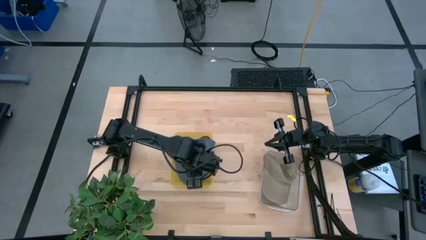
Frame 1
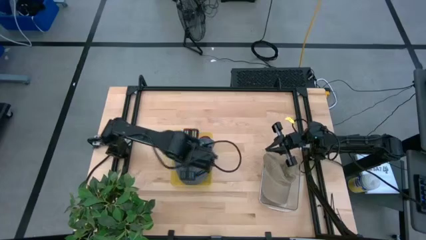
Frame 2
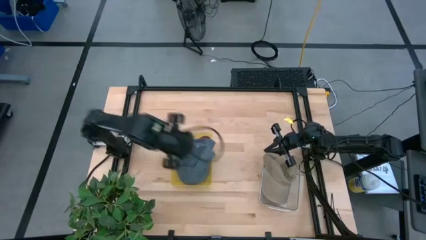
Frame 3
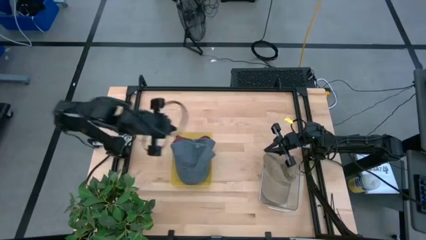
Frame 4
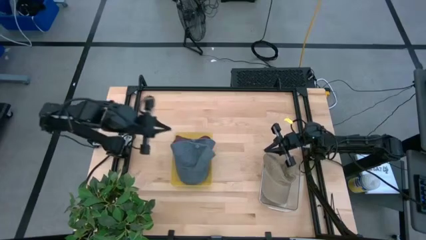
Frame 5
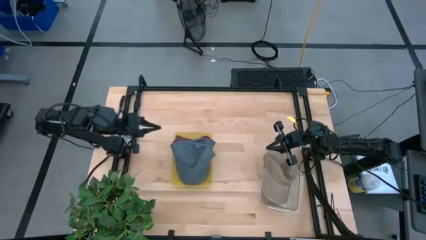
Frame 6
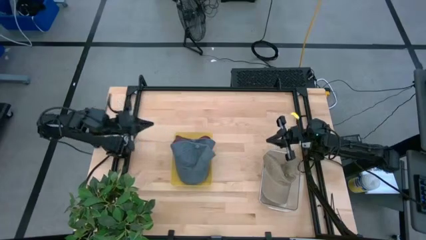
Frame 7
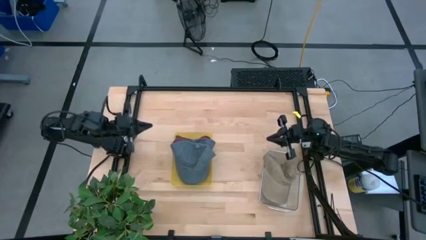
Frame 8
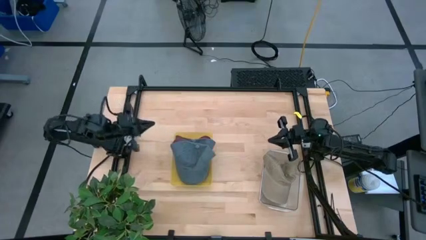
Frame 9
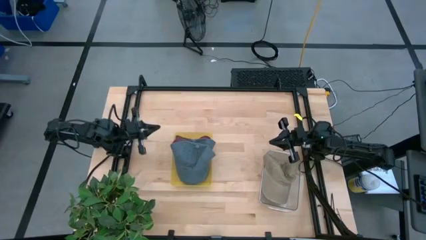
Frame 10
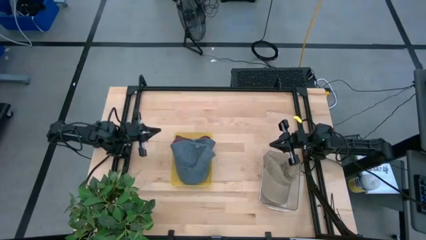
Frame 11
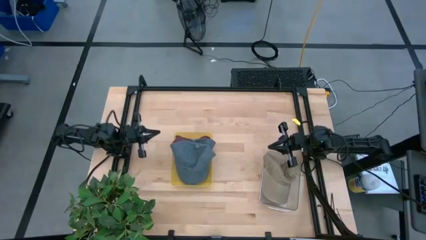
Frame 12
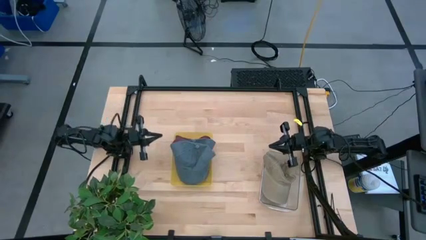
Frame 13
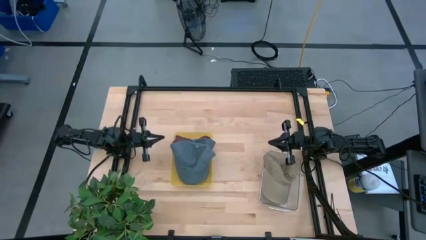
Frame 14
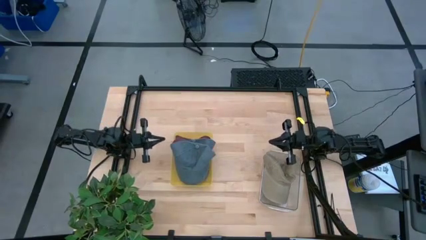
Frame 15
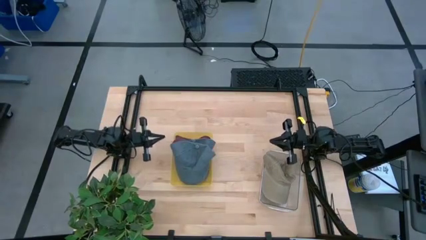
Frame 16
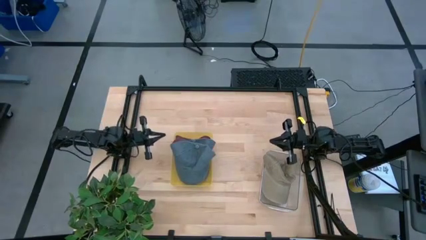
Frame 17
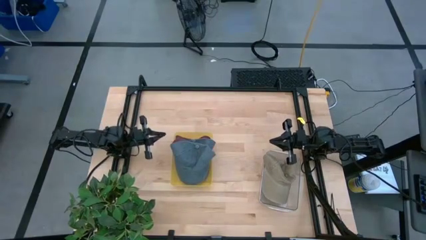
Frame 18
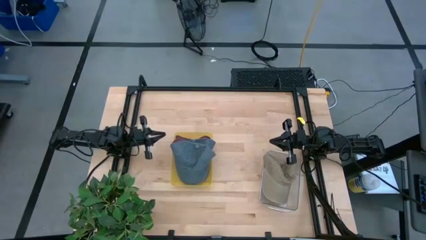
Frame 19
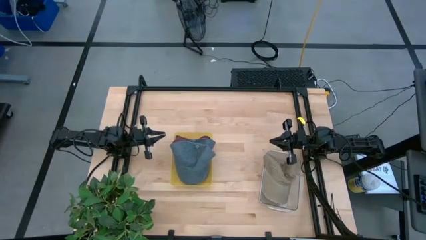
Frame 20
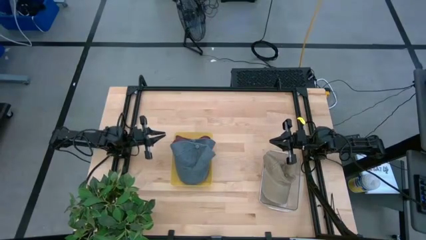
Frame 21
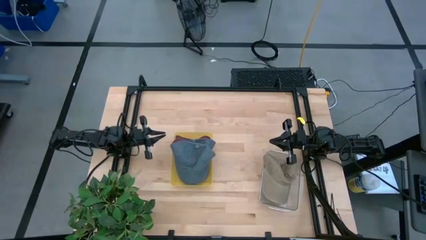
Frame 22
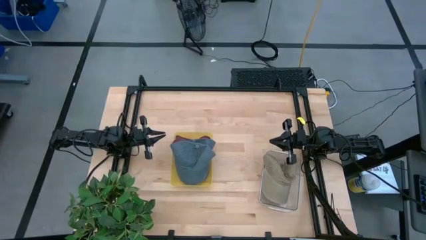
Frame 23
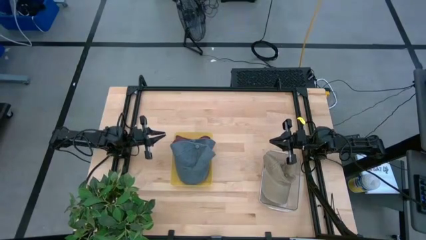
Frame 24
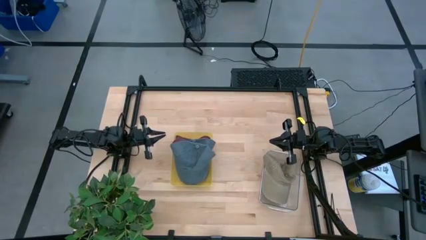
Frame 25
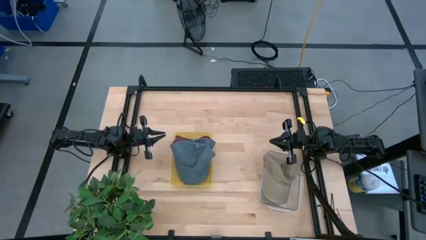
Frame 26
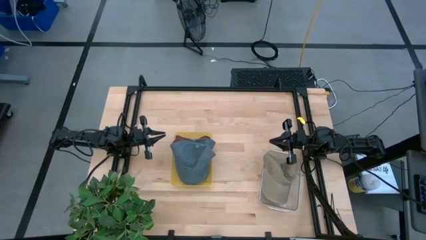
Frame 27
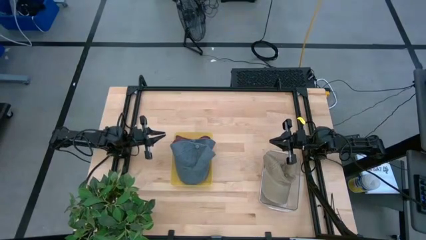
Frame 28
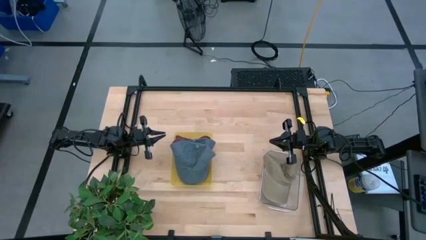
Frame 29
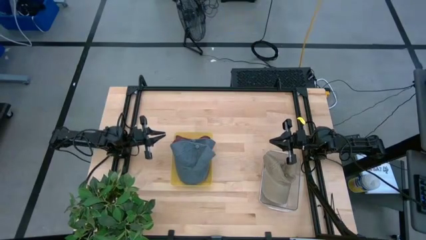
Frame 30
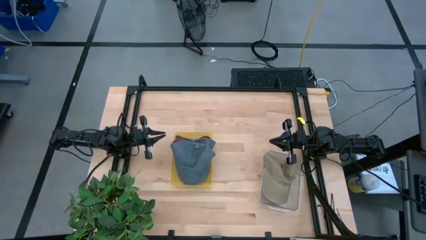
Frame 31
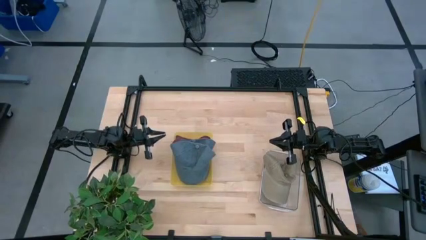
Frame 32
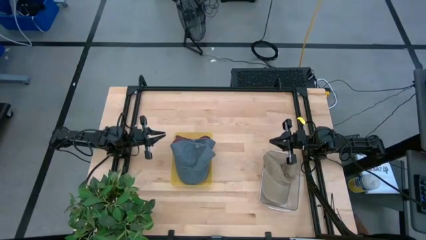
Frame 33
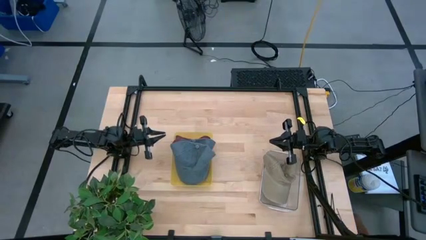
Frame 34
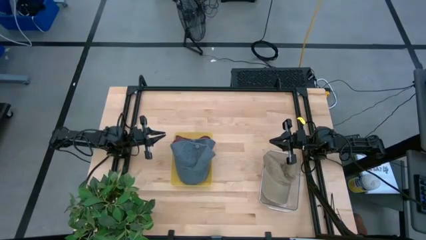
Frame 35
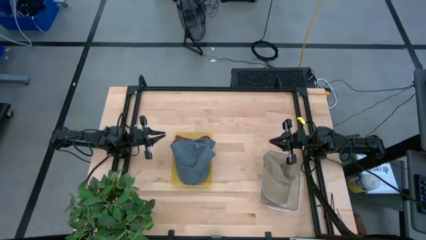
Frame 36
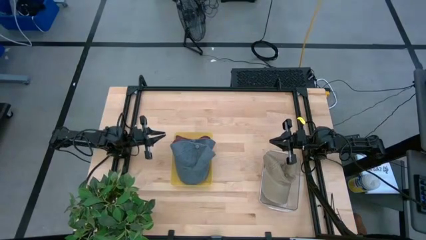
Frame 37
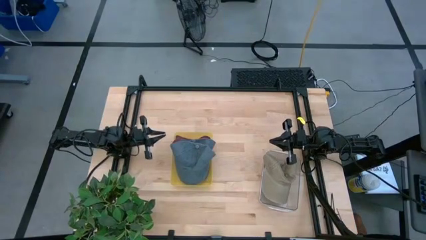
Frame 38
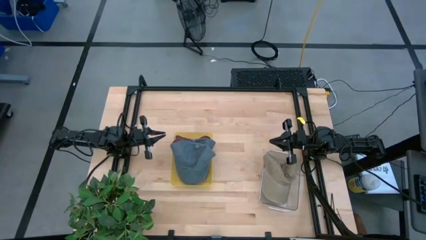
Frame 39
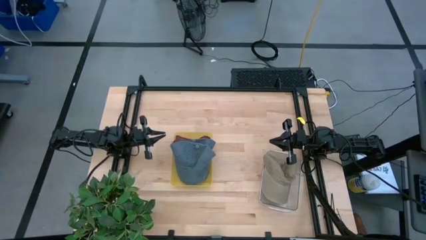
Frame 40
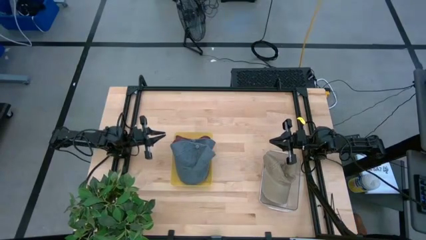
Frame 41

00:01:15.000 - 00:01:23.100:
Task: Pick & Place hat
Return to Home Position

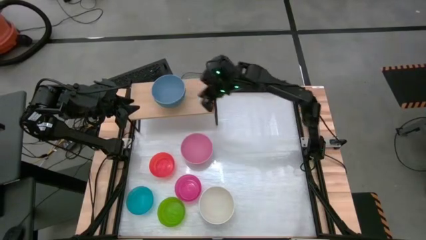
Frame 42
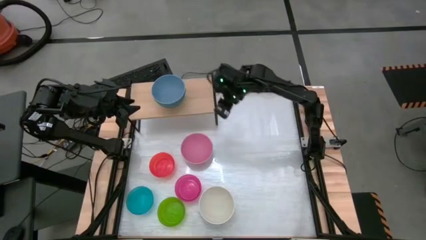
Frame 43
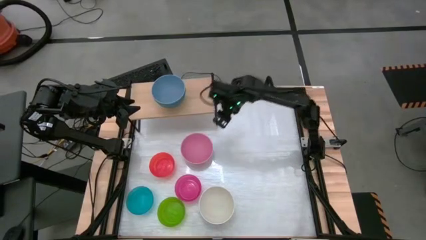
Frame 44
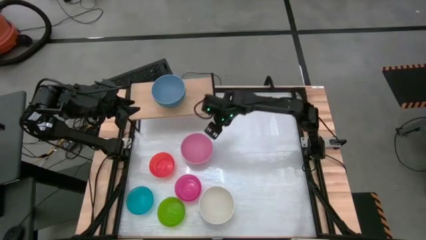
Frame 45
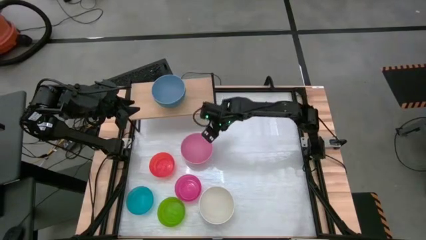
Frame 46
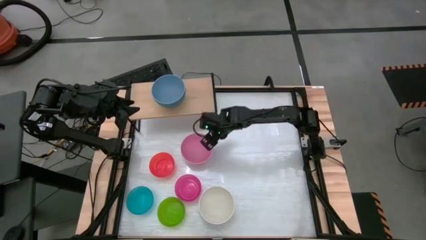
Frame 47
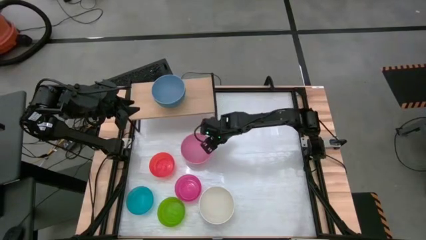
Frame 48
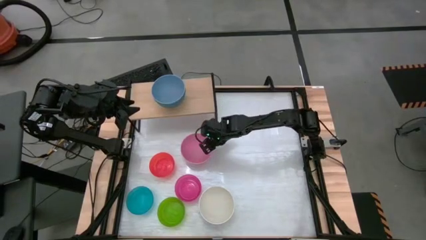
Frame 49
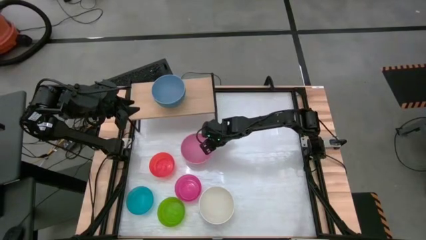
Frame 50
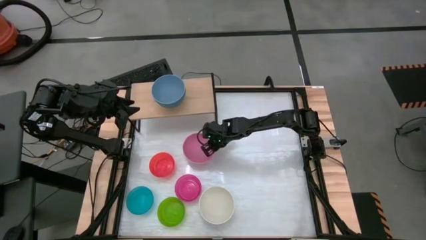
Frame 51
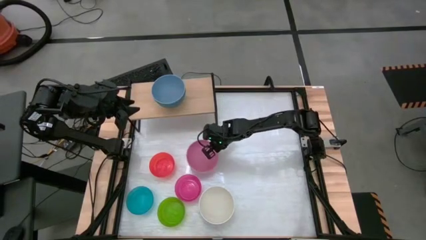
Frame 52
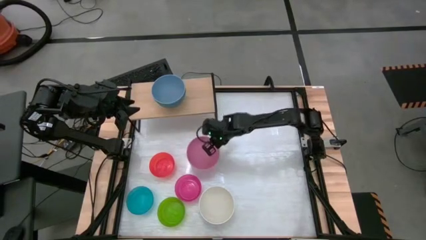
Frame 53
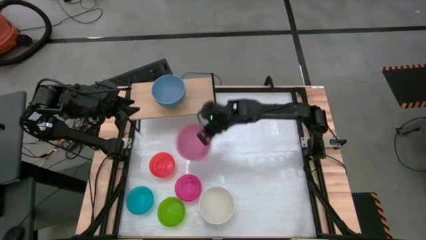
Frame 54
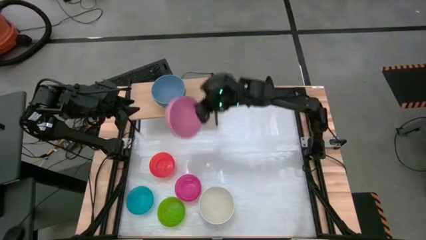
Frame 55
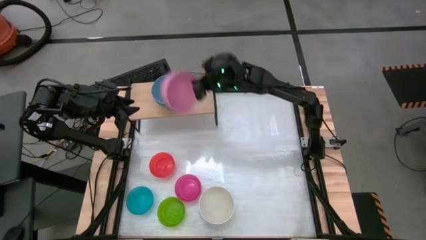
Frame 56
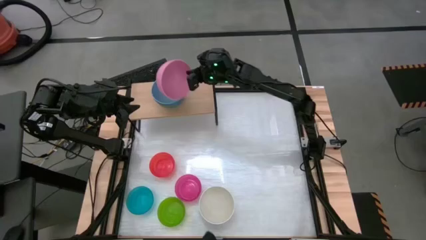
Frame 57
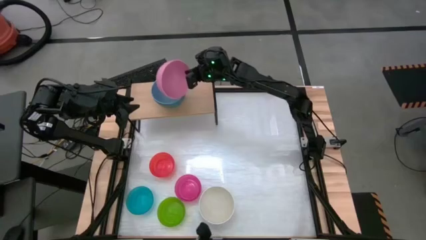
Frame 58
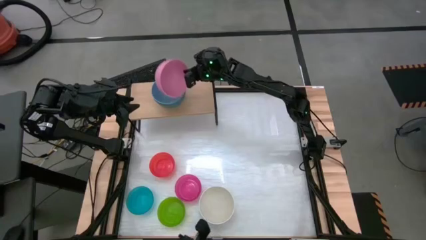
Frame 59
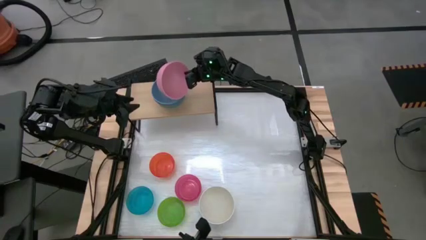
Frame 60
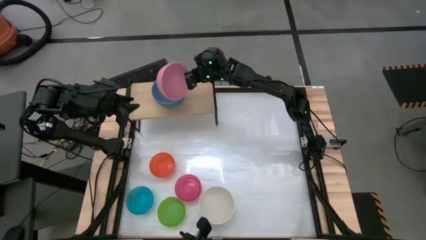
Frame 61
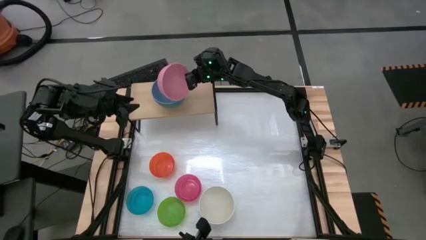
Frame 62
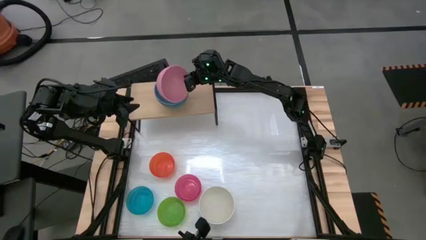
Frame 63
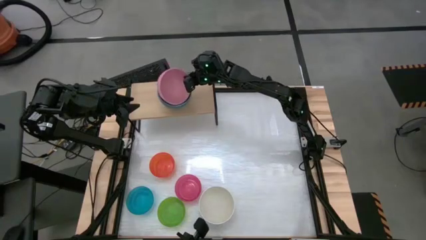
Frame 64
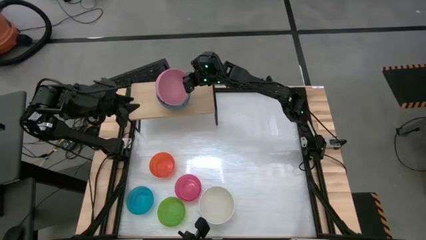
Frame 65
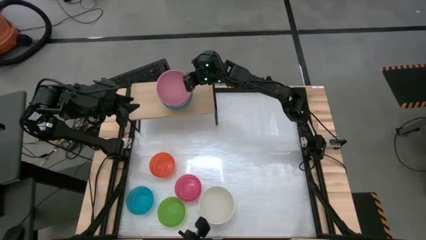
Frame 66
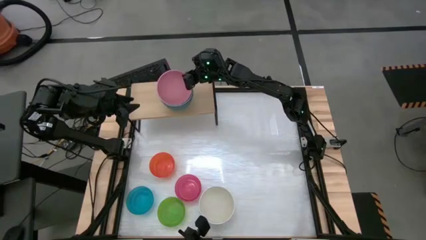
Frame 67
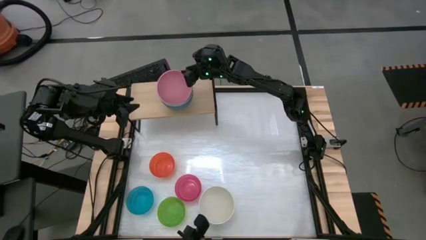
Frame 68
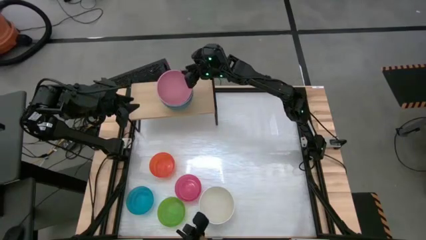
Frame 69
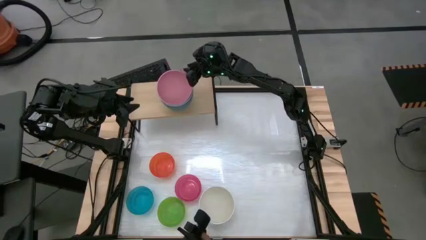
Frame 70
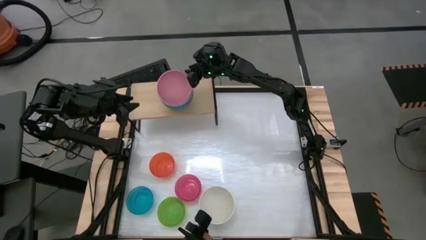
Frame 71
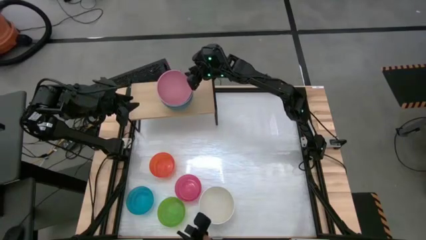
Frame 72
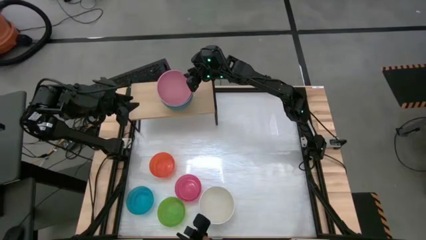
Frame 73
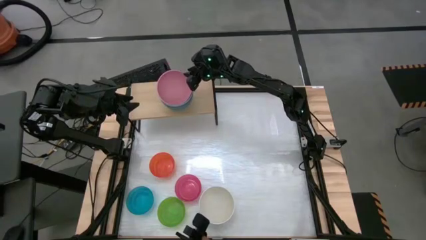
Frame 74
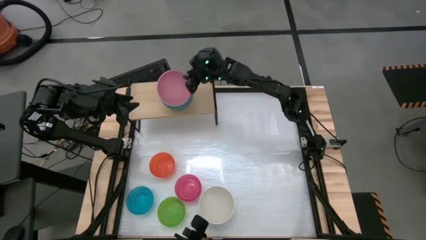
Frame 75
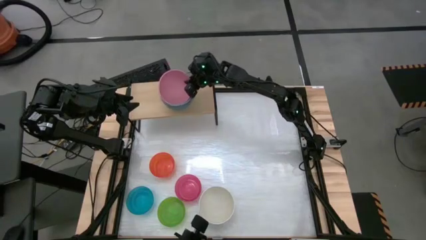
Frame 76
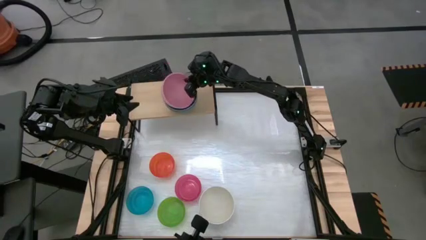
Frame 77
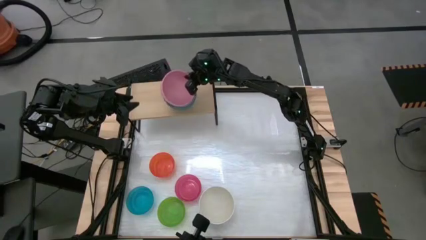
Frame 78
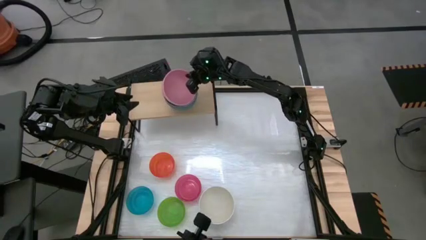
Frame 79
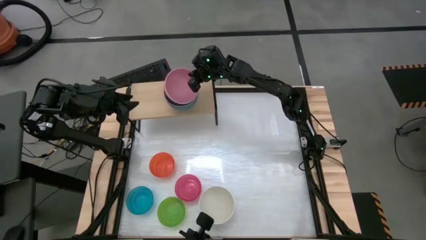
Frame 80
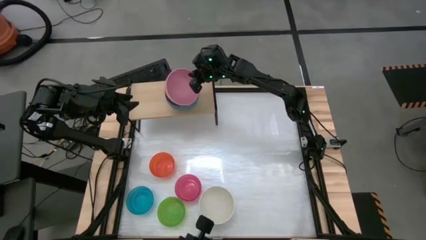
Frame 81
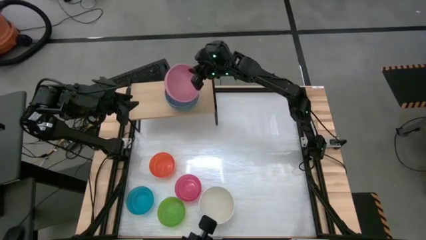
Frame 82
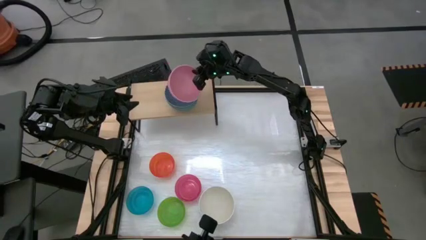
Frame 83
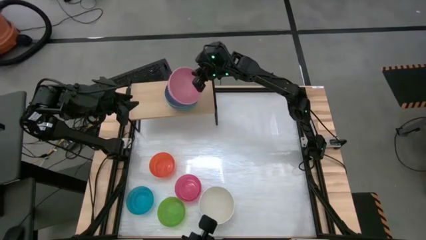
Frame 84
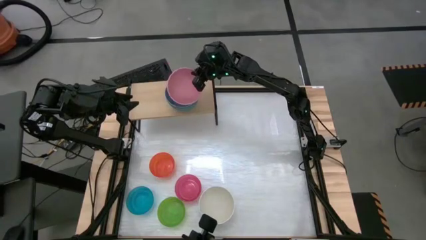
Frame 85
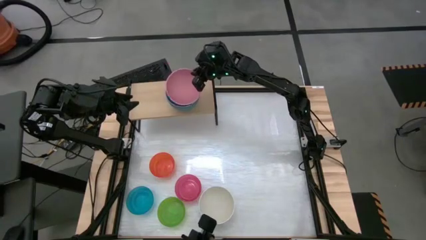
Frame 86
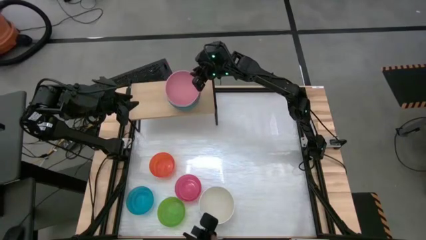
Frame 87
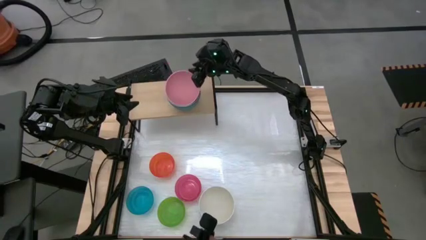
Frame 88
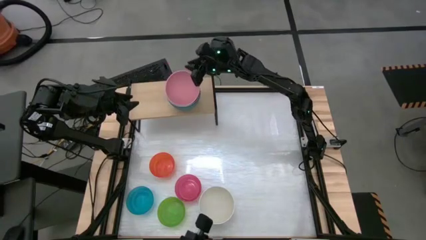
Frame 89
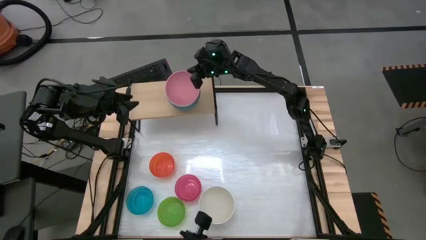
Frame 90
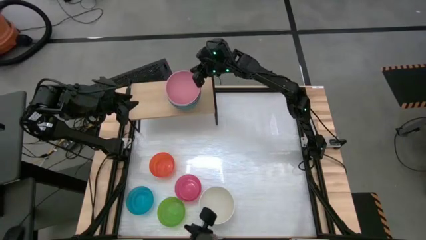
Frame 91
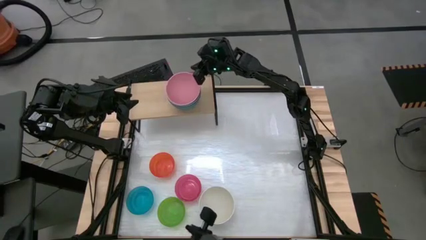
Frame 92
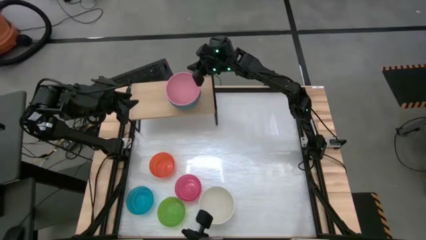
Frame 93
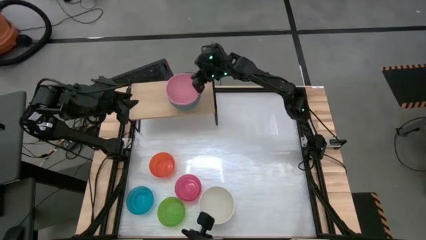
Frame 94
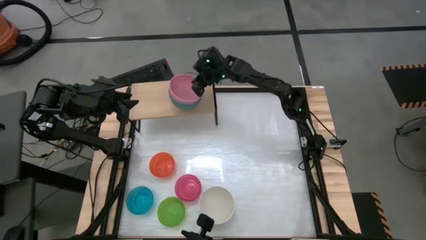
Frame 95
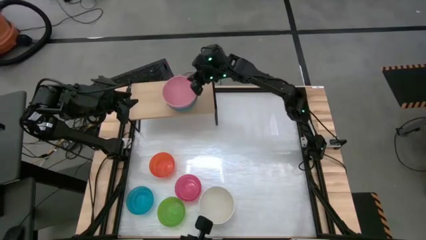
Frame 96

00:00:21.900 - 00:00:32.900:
Task: Place and stack bowls onto a shelf
Stack the large pink bowl on top of the large blue bowl on the shelf
